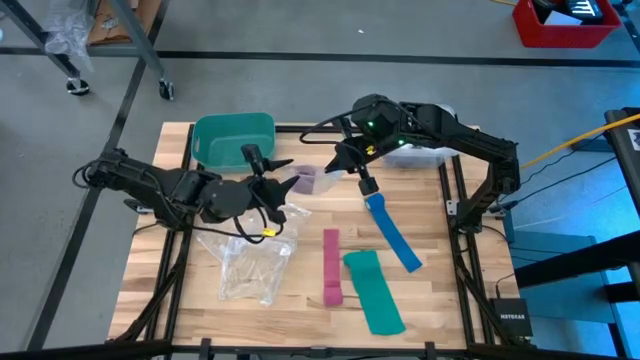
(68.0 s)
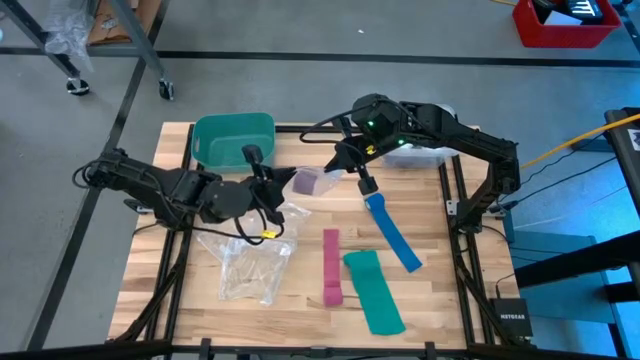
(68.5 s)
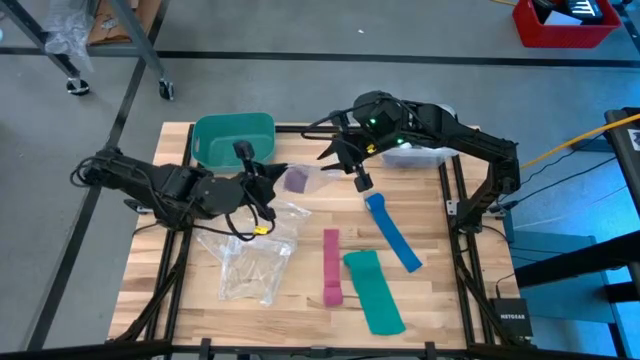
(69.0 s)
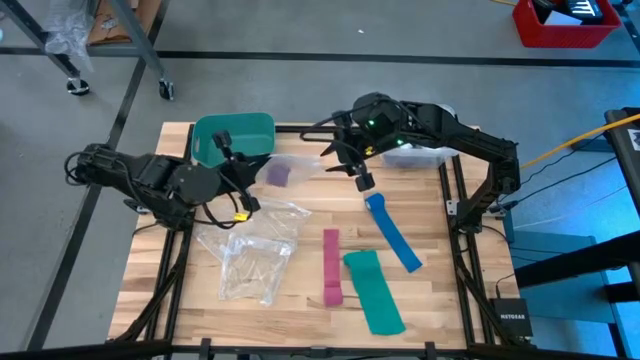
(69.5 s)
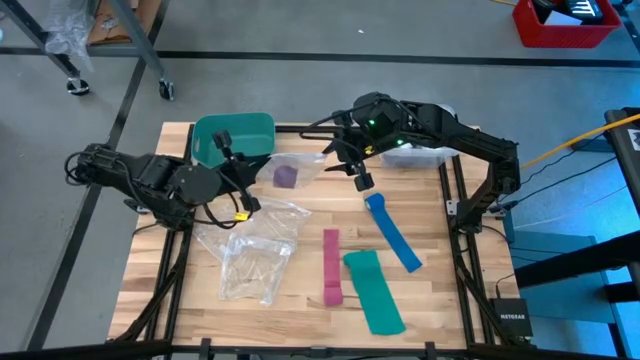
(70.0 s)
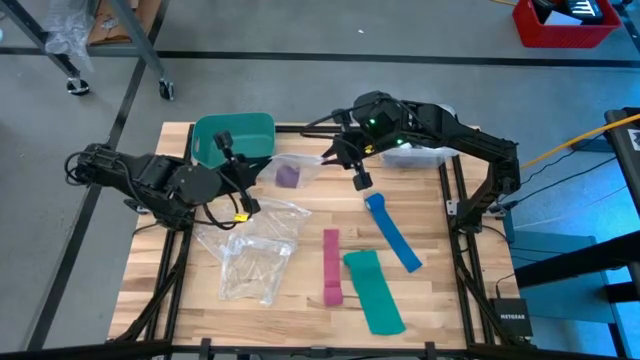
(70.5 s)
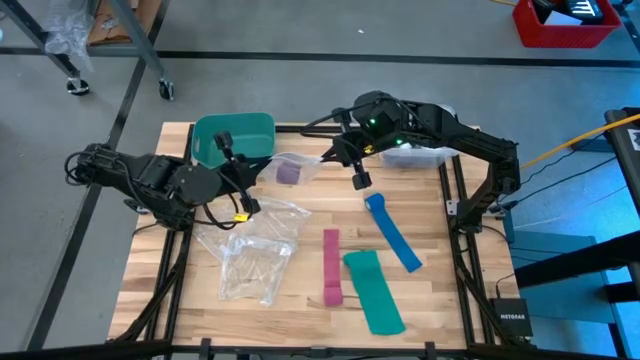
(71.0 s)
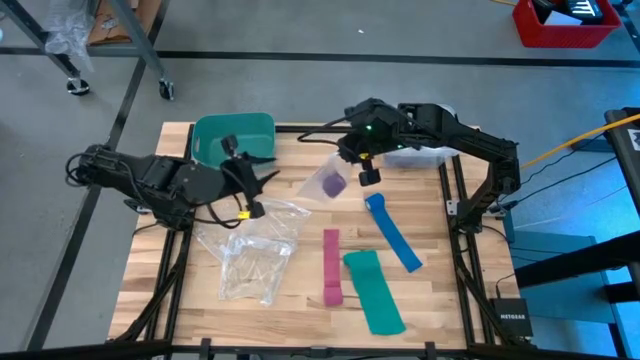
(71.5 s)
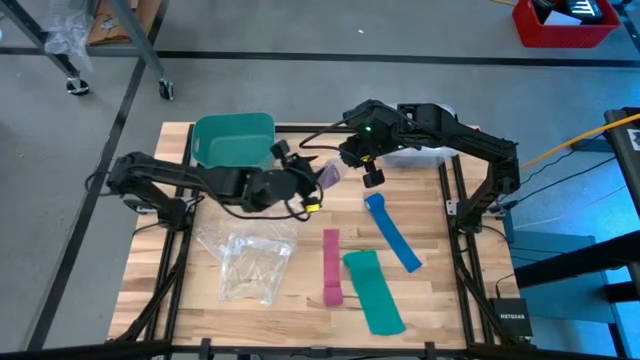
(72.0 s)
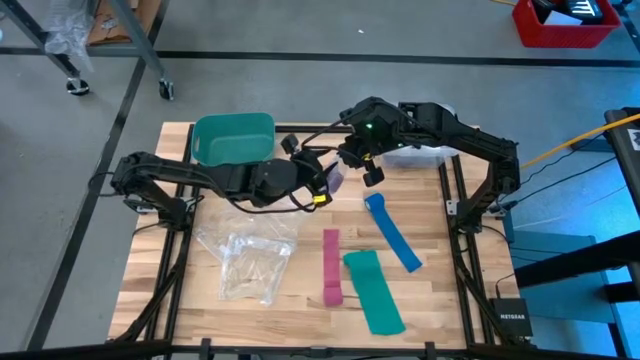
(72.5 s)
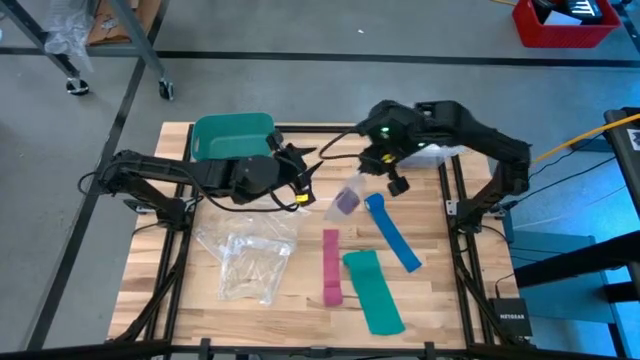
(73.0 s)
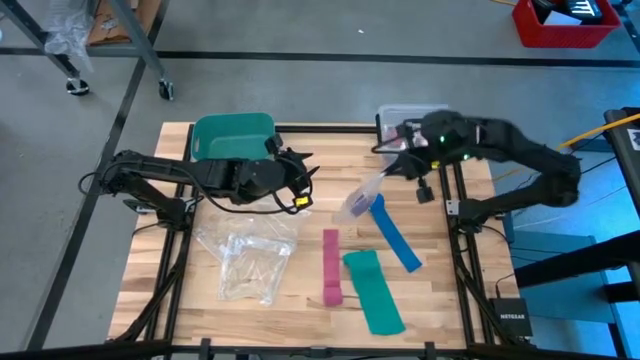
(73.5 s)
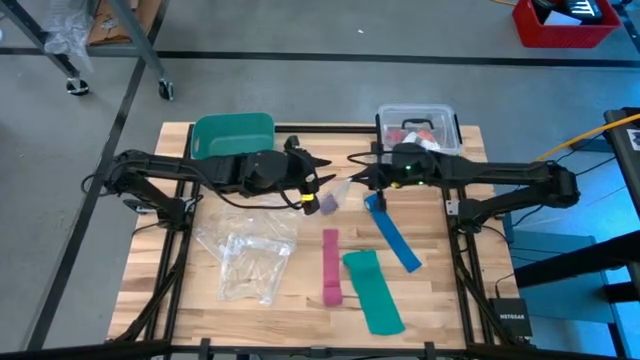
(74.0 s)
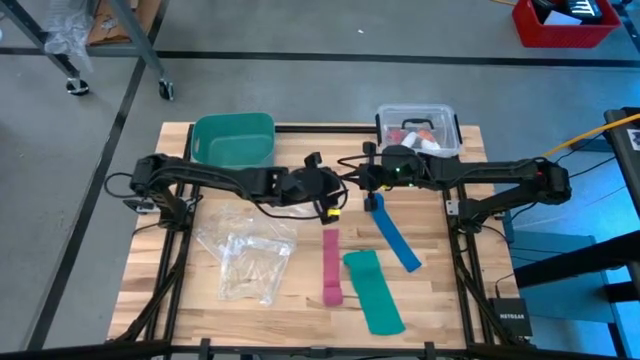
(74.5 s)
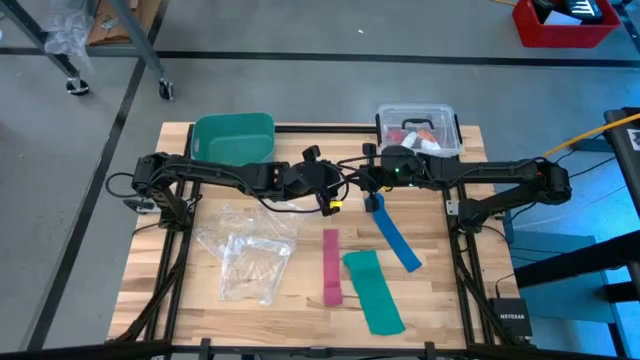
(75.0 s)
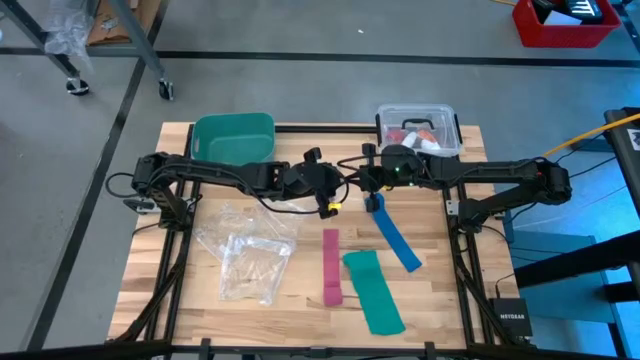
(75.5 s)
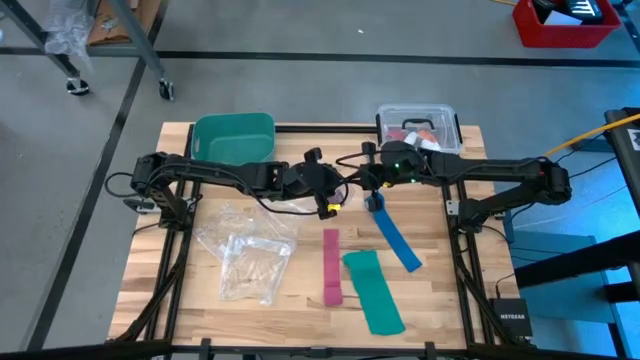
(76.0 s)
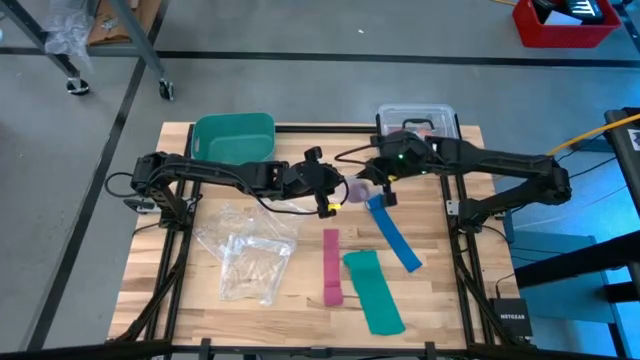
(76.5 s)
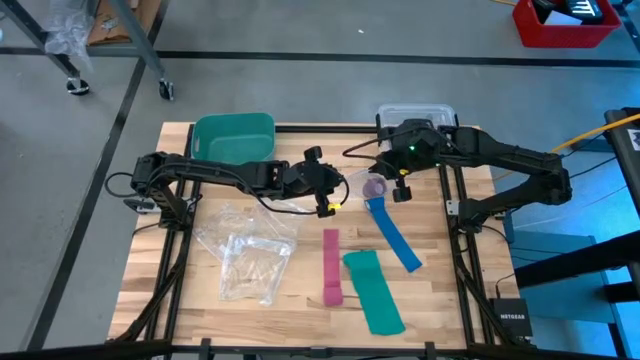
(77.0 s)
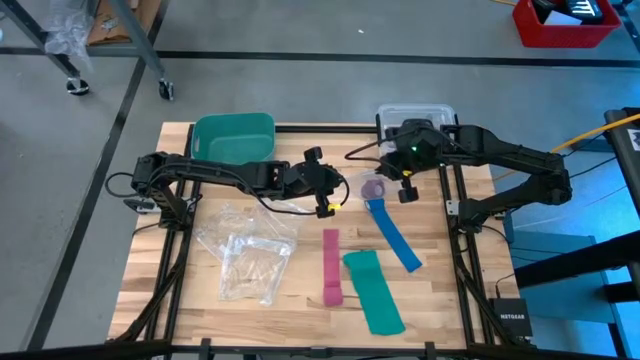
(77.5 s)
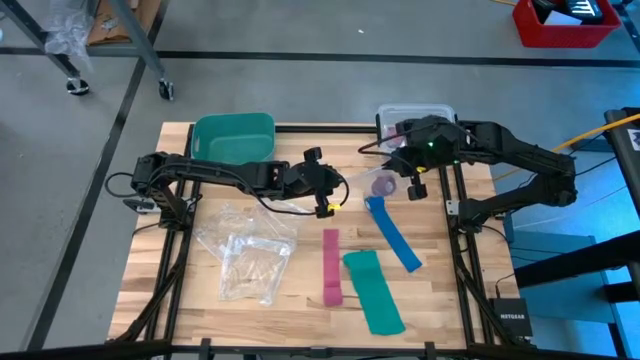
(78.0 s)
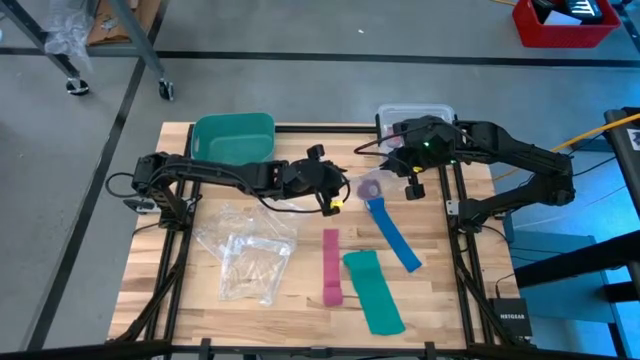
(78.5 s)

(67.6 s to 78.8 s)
Task: Roll bandage
Close the transparent zip bag

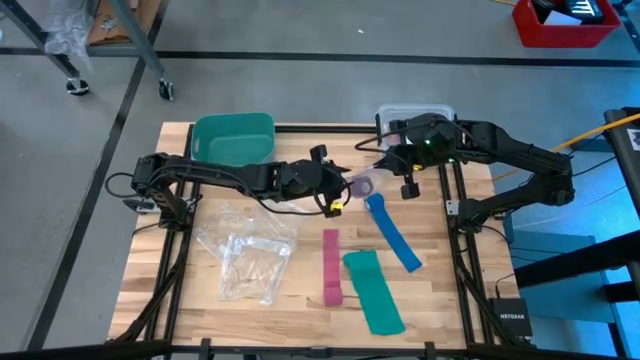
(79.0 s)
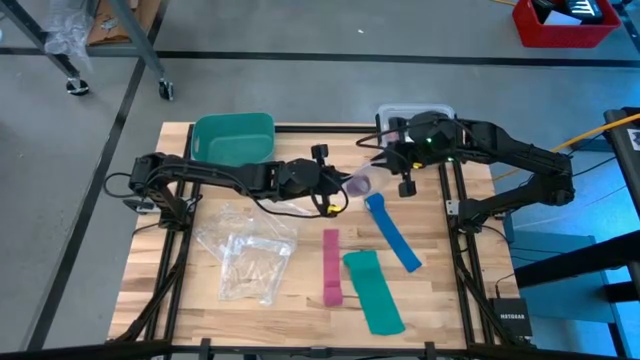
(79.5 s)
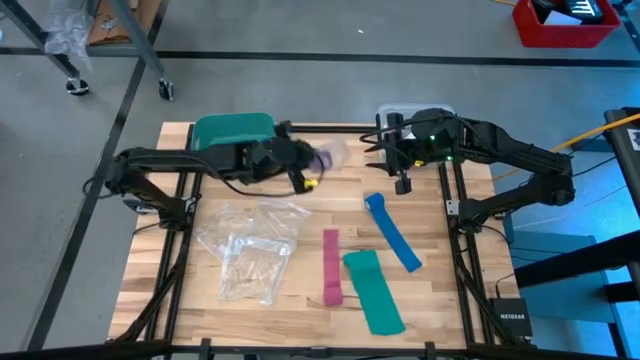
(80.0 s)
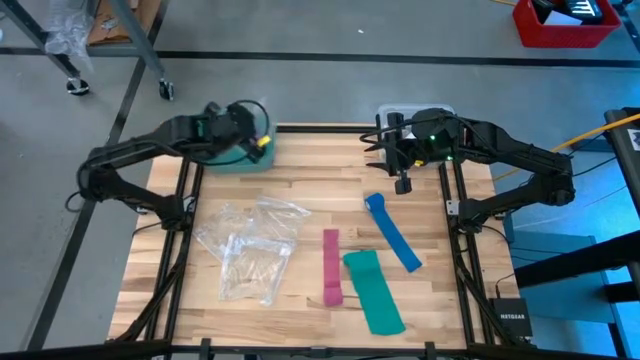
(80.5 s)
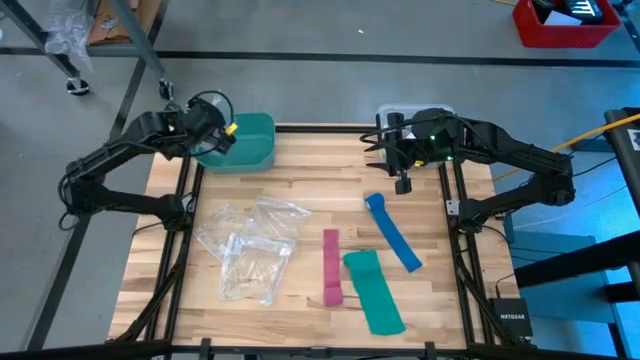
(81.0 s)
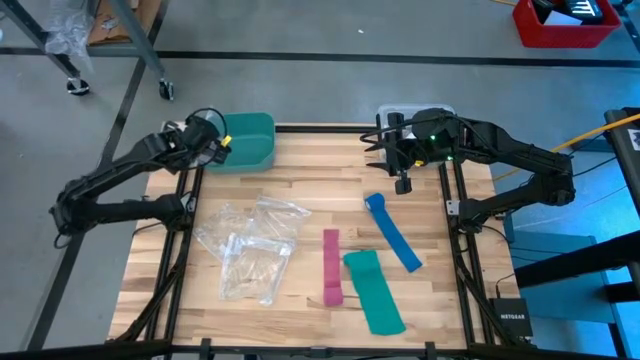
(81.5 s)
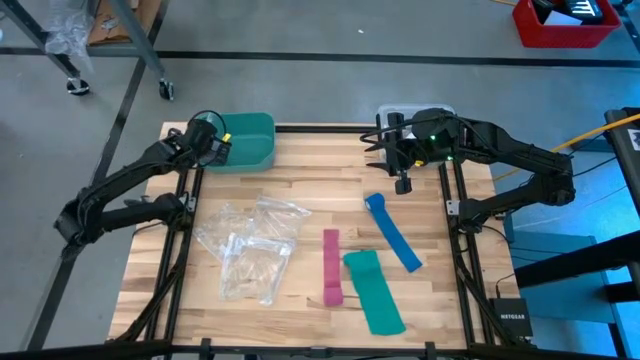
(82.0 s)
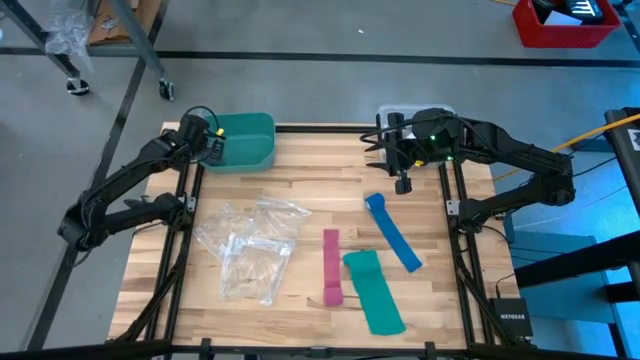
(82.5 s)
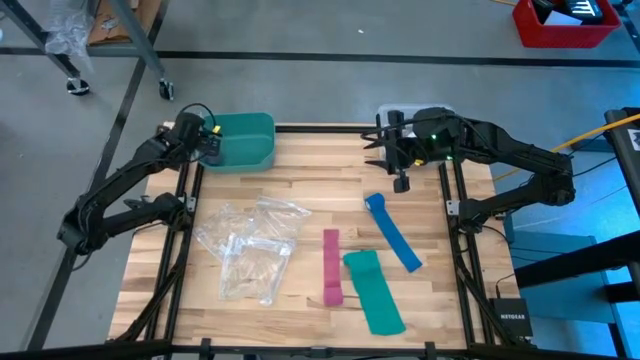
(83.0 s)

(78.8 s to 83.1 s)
Put the packed bandage into the green bin

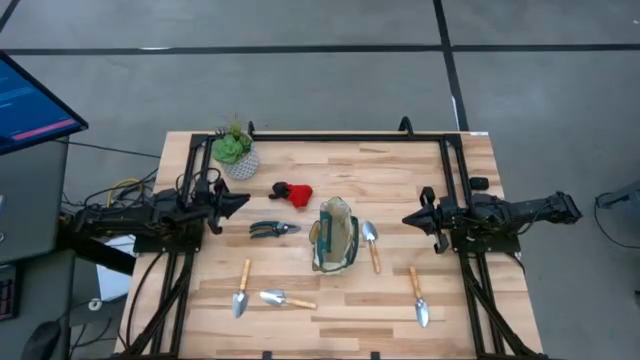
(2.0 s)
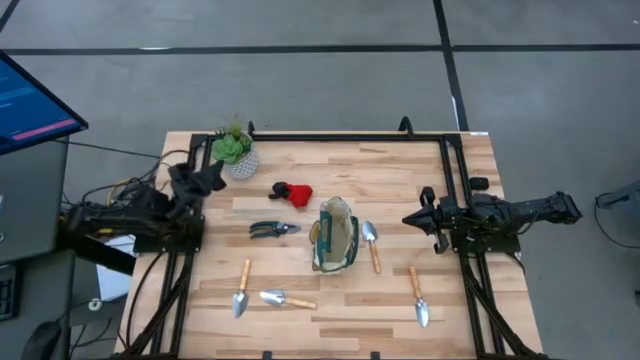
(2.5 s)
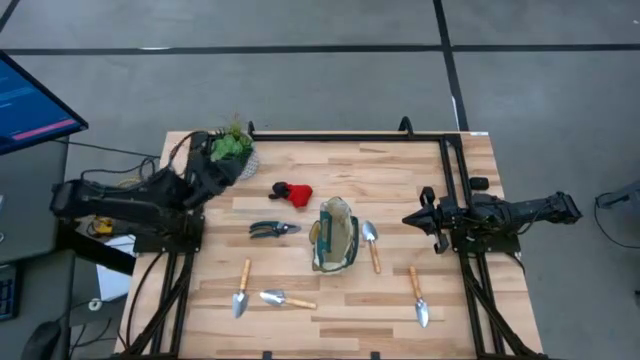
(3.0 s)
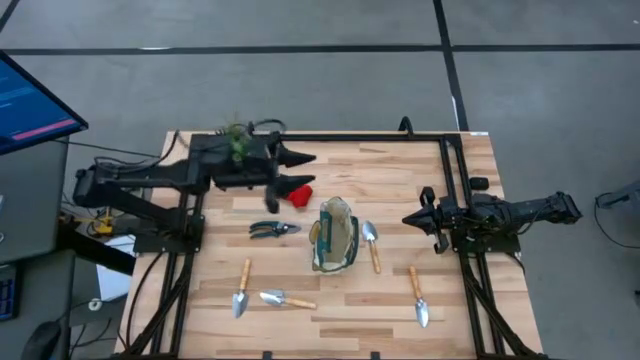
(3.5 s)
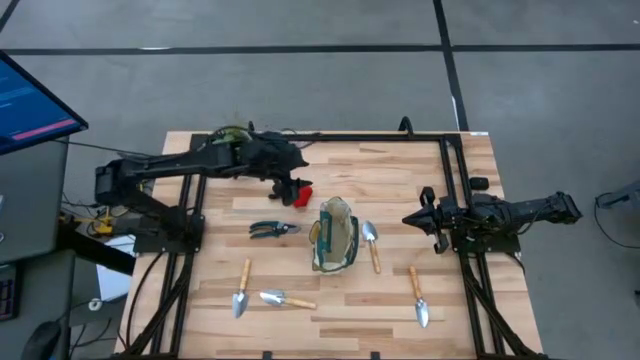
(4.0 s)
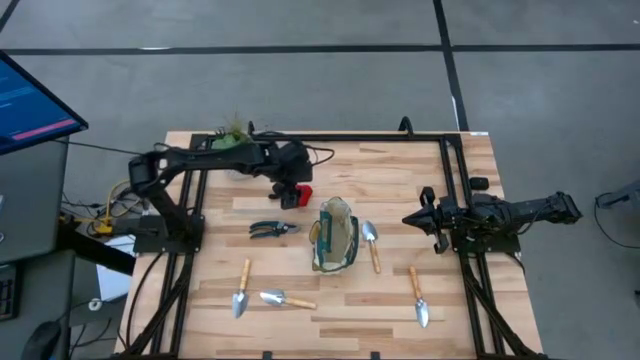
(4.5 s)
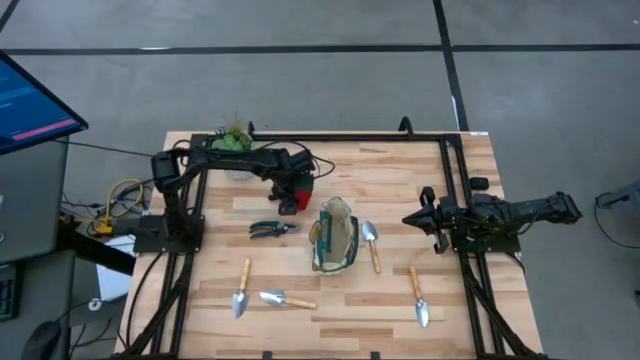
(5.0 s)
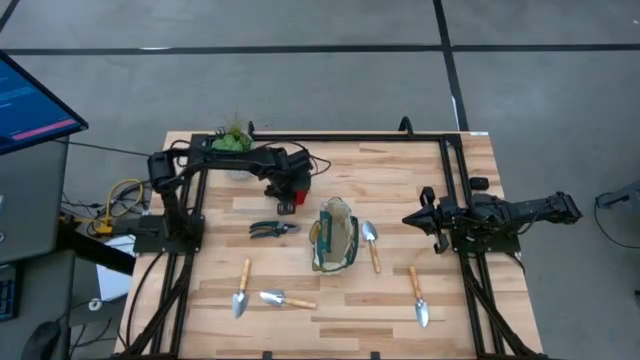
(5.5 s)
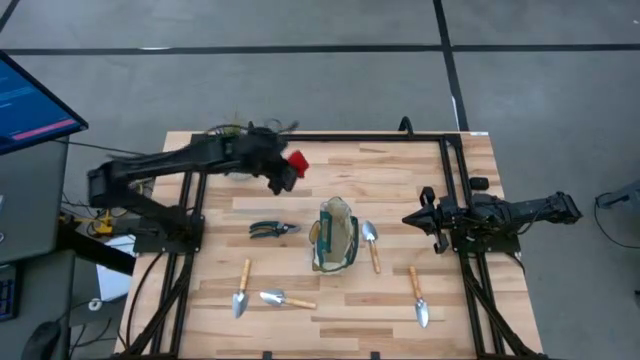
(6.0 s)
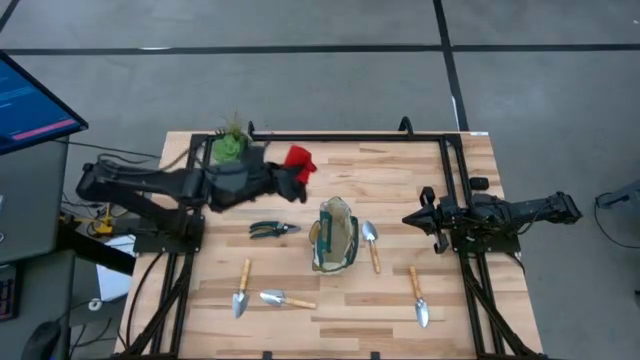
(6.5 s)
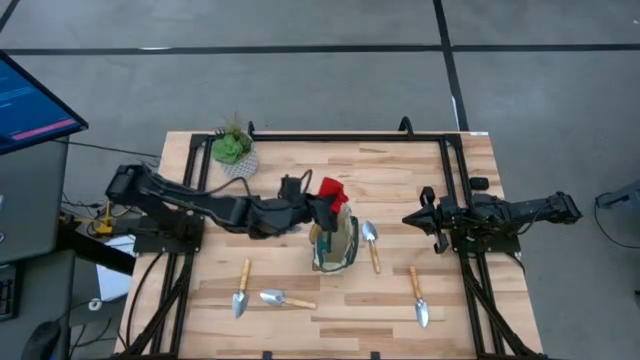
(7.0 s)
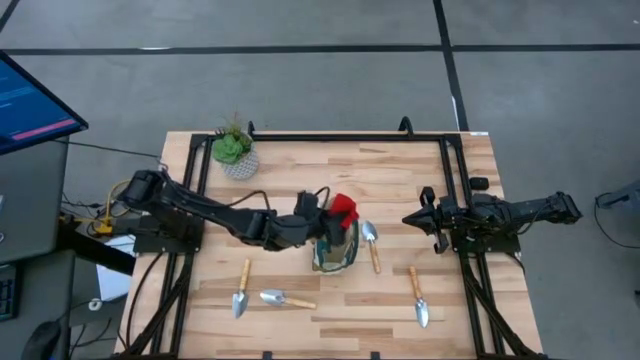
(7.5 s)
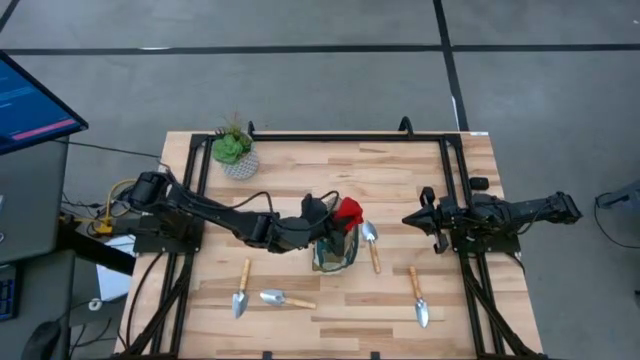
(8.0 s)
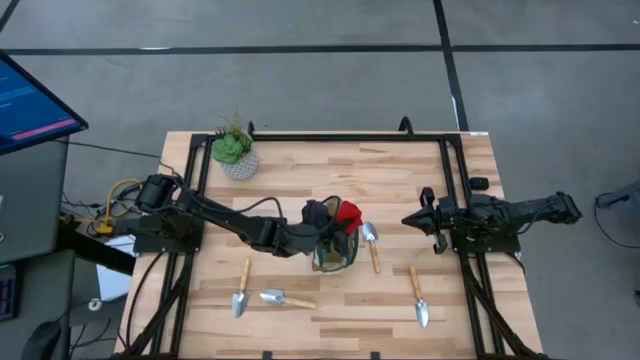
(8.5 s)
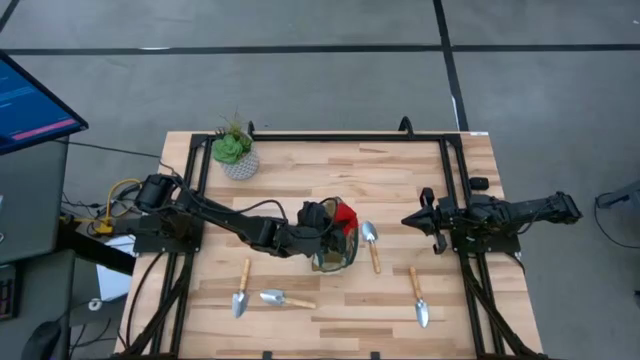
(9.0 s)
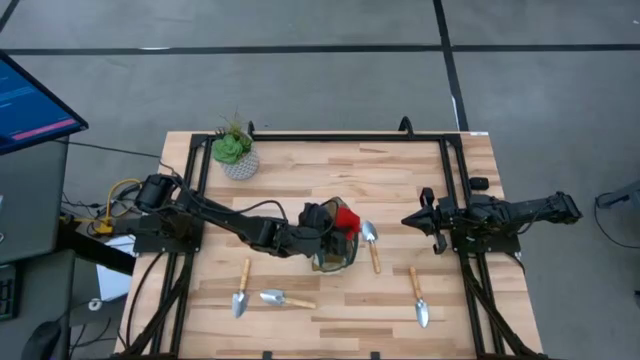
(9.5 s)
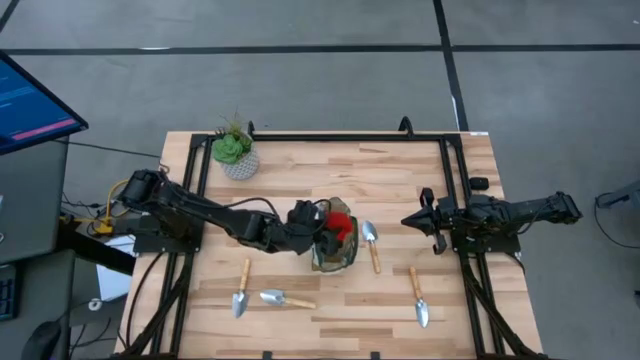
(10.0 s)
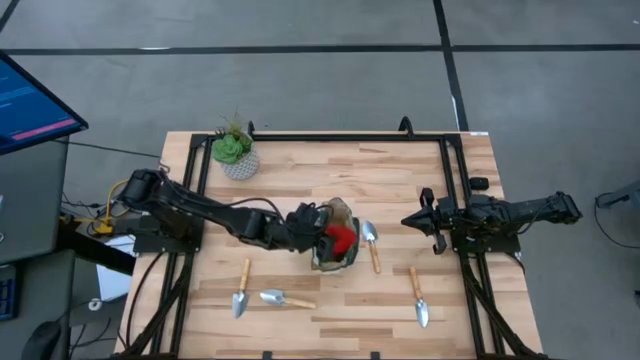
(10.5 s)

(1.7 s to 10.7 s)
Task: Pick & Place Garden tools in Gardening bag
Put the gardening glove into the gardening bag
